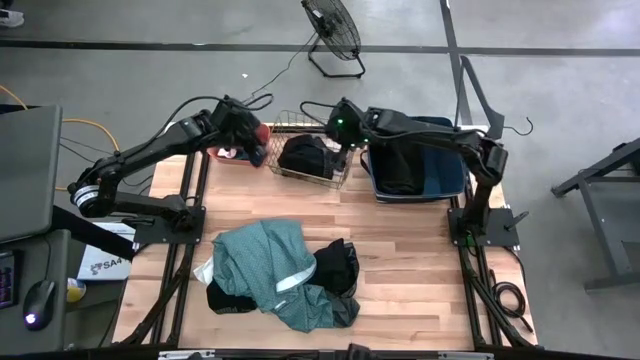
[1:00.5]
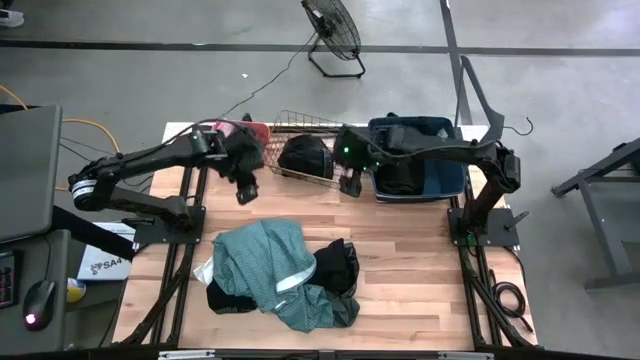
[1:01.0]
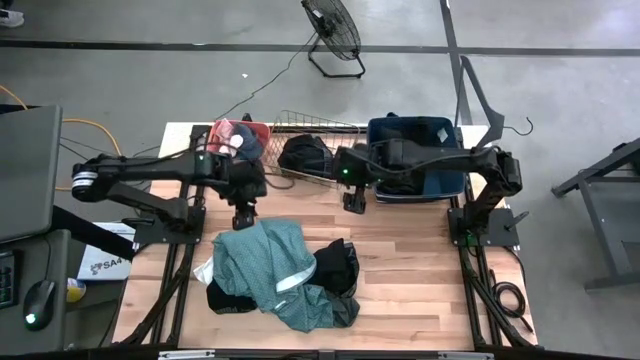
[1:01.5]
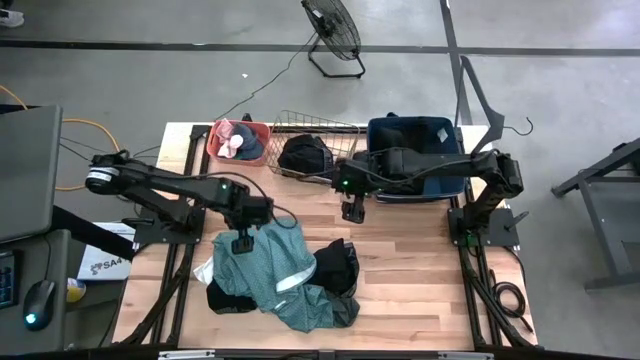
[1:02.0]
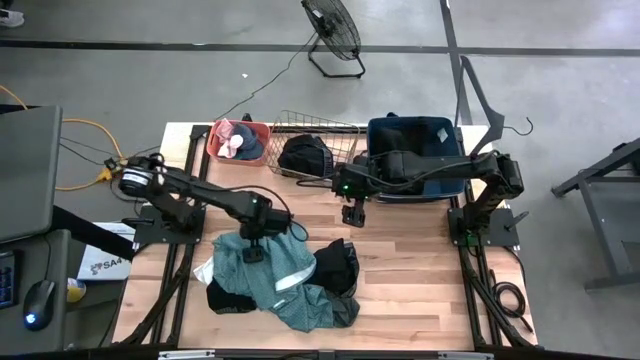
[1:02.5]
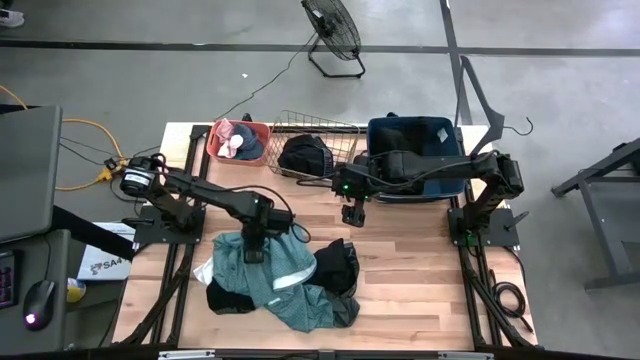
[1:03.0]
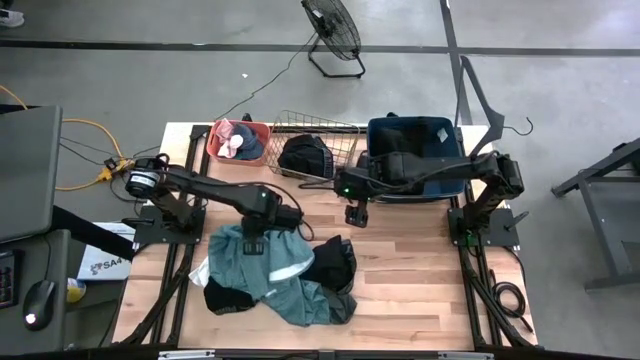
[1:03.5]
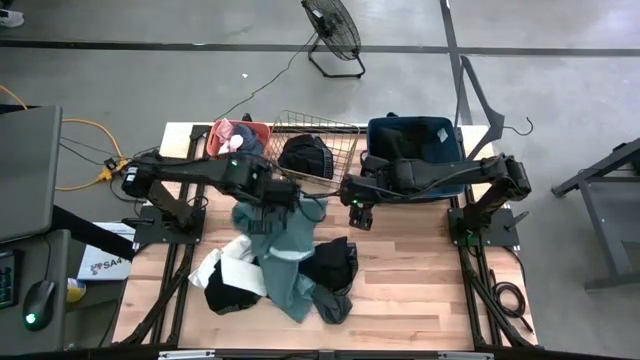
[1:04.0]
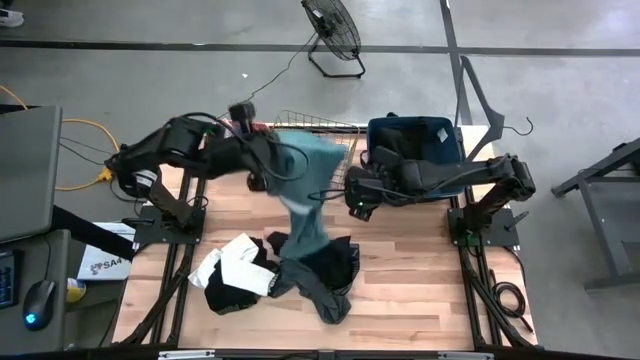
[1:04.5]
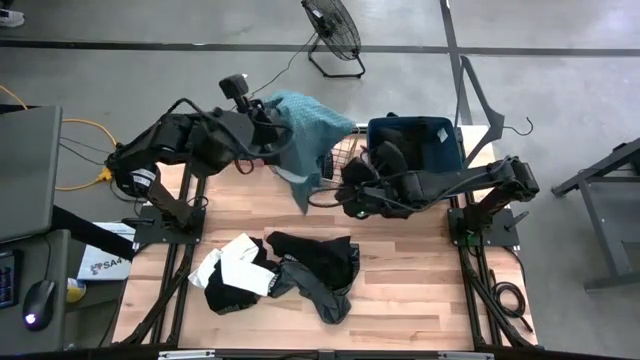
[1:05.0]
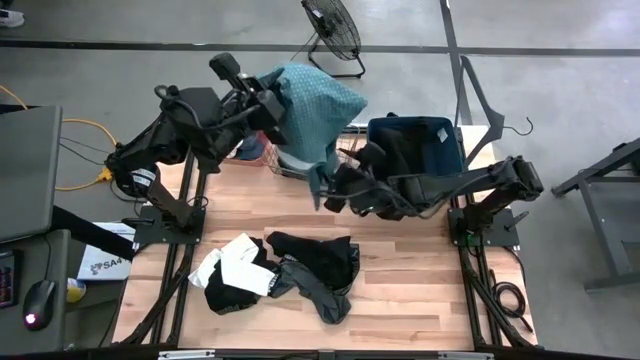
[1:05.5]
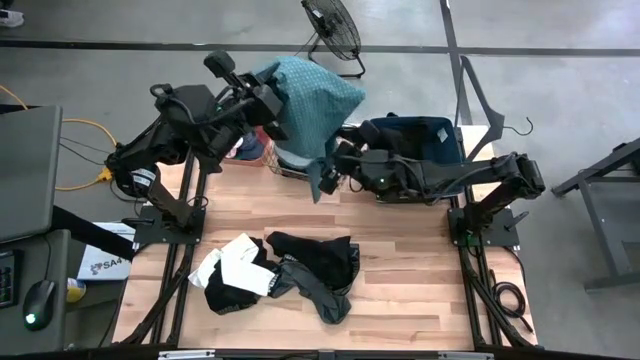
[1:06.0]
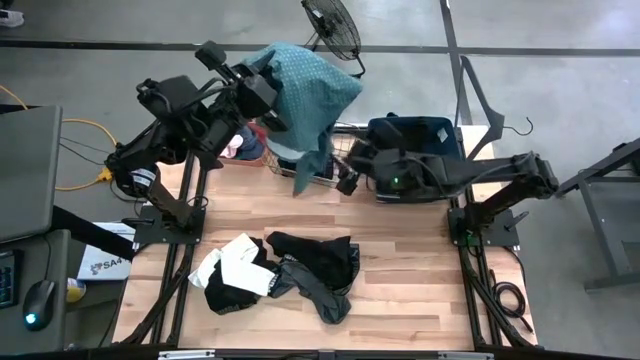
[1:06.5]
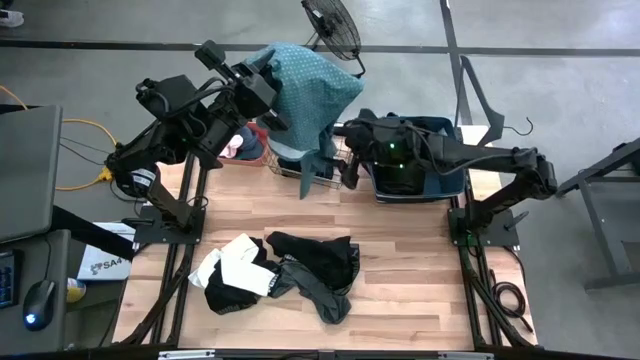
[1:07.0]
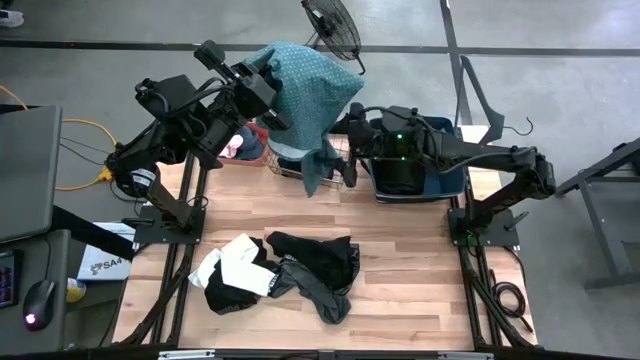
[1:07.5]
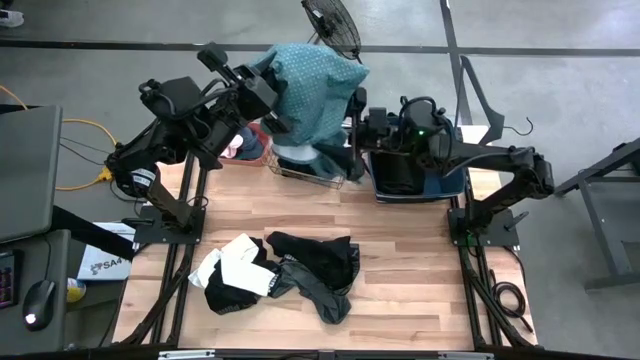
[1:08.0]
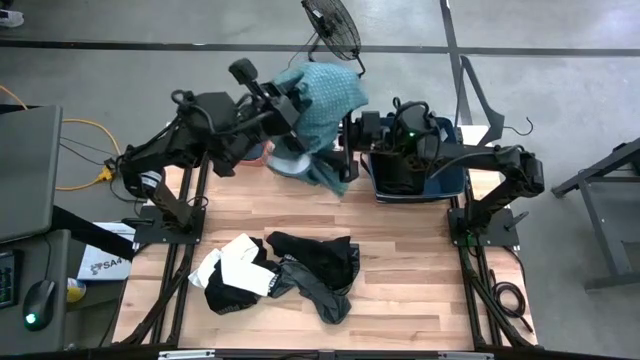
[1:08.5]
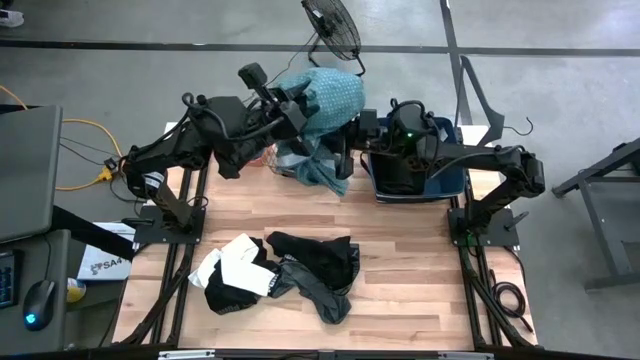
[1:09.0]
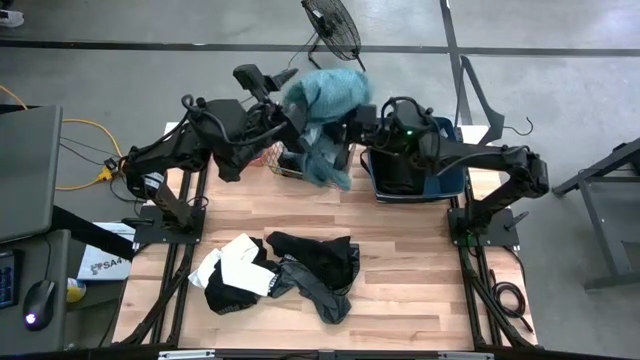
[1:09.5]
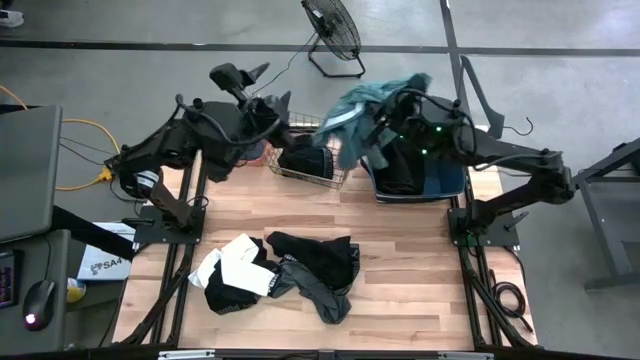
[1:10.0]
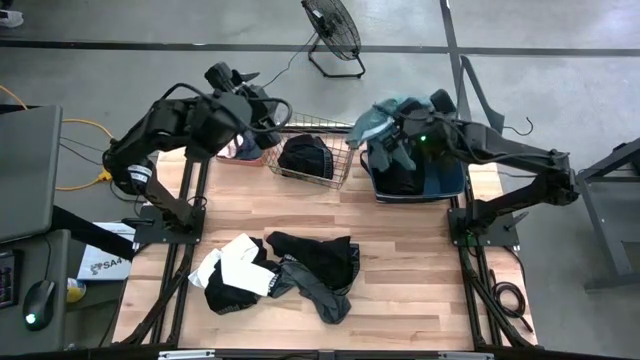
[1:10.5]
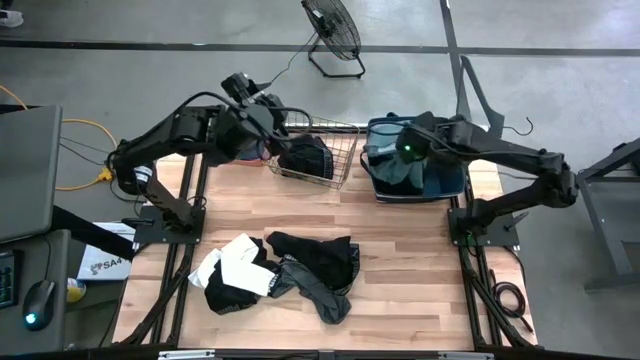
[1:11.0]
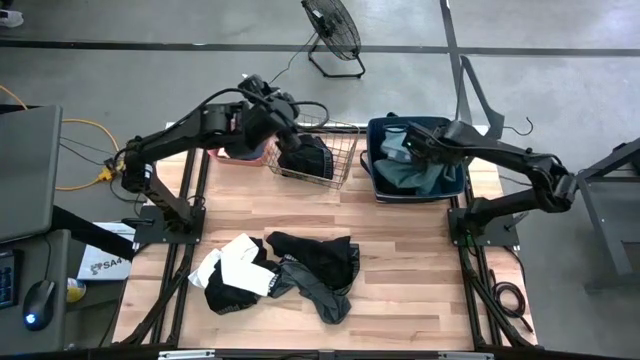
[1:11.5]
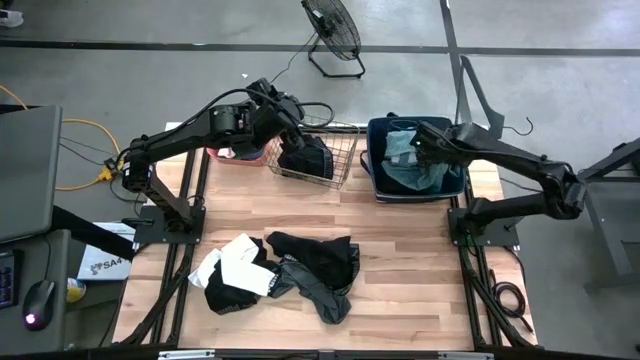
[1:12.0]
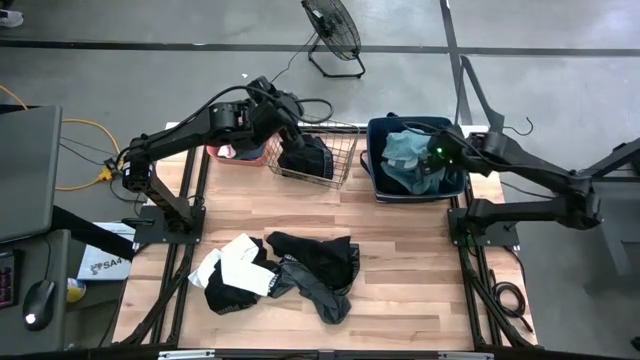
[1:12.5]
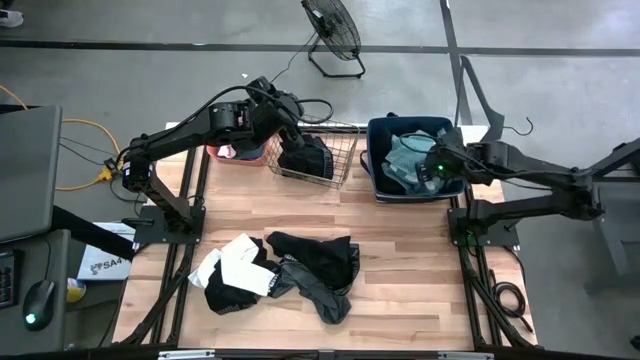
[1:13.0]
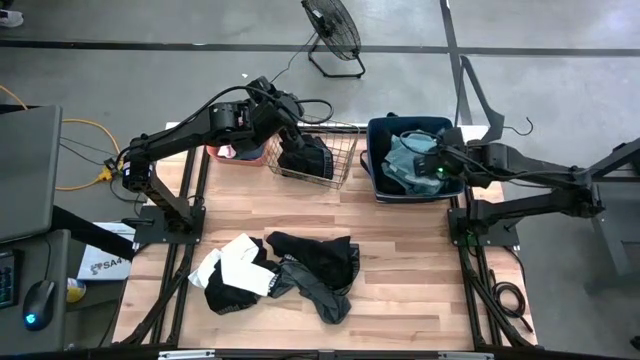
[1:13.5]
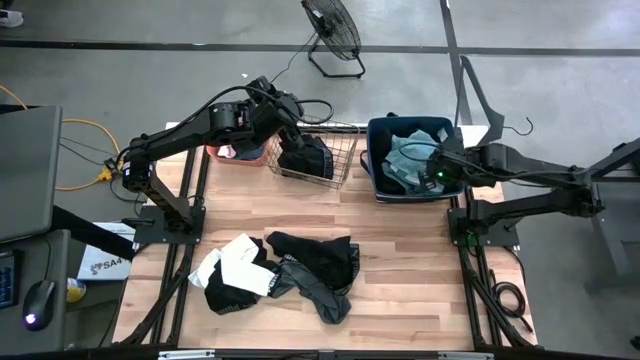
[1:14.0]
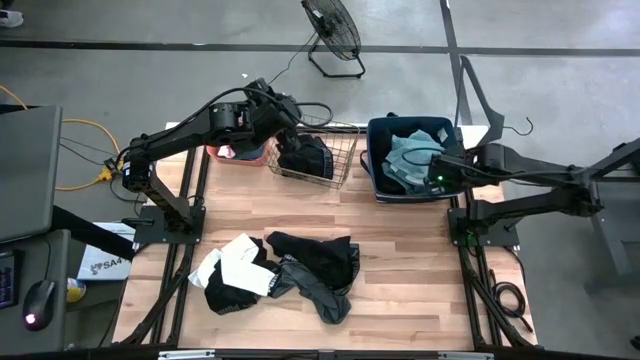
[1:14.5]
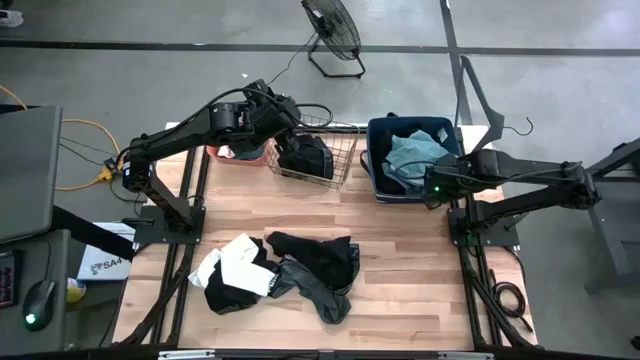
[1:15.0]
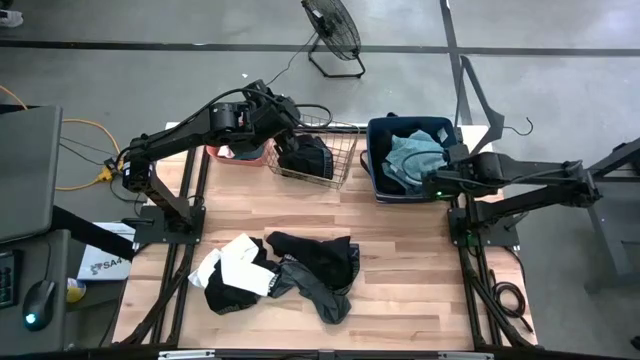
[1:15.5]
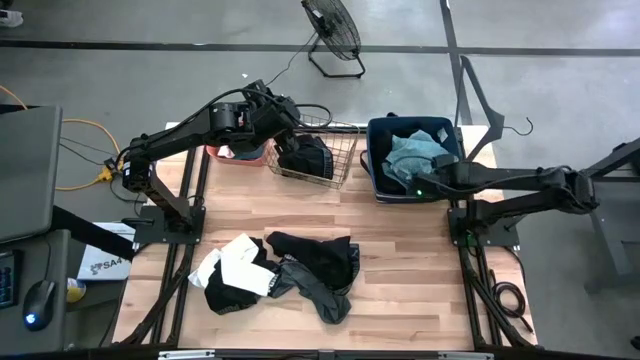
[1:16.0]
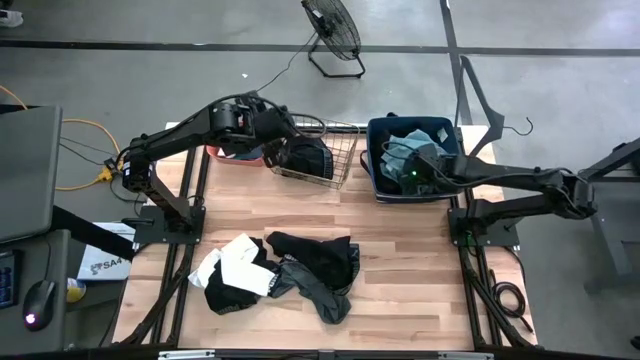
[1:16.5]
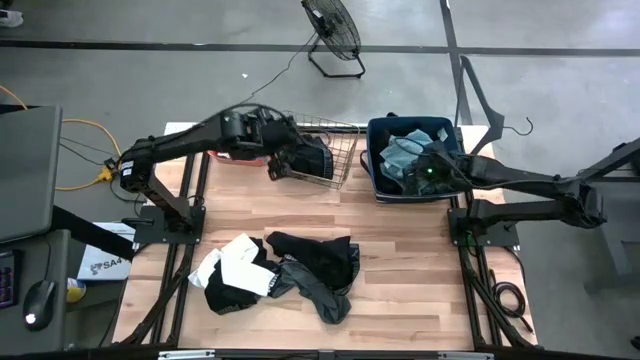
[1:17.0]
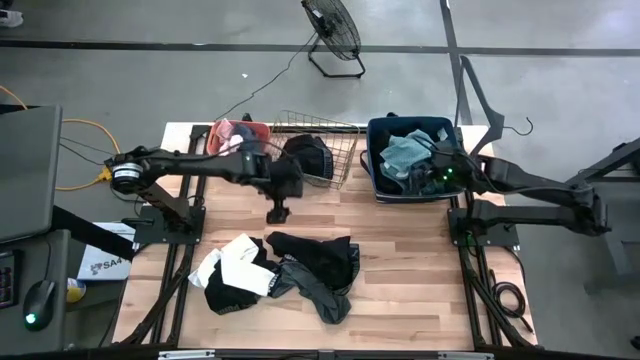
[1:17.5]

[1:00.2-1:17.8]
Task: Pick & Place Cloths
Put the light blue shirt into the blue laundry organizer
